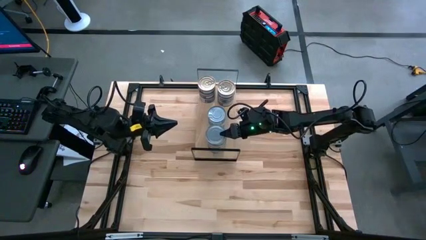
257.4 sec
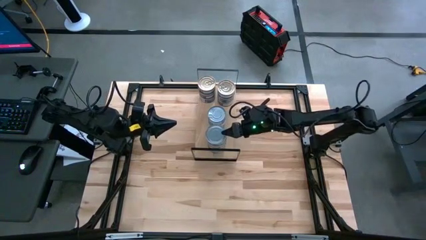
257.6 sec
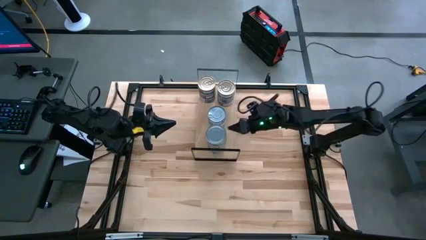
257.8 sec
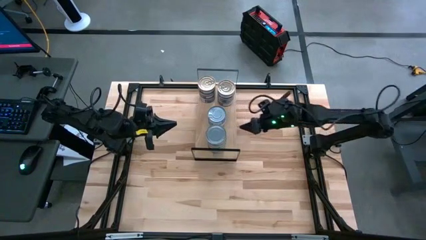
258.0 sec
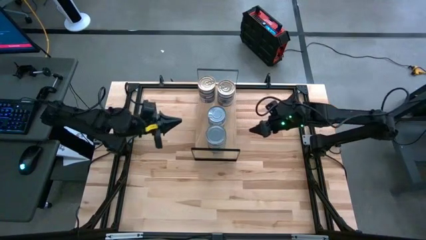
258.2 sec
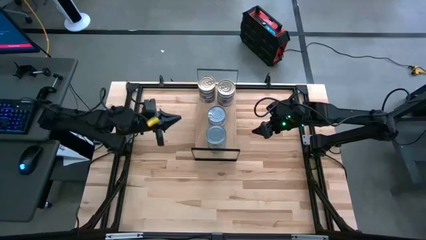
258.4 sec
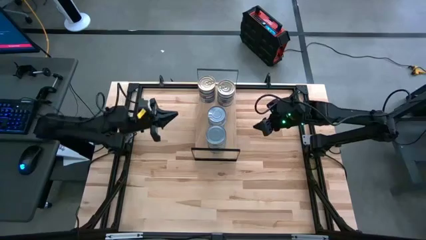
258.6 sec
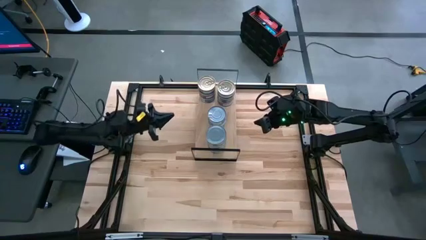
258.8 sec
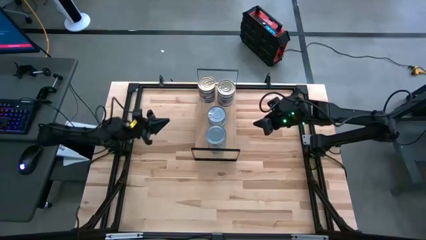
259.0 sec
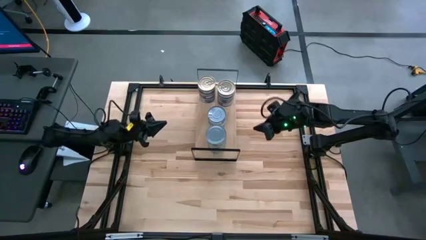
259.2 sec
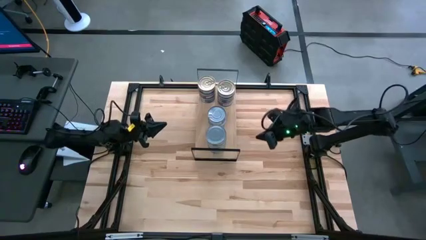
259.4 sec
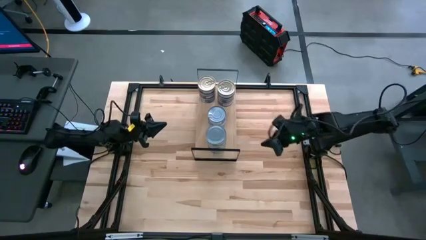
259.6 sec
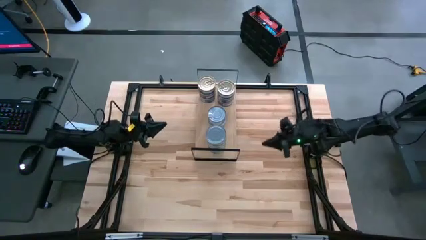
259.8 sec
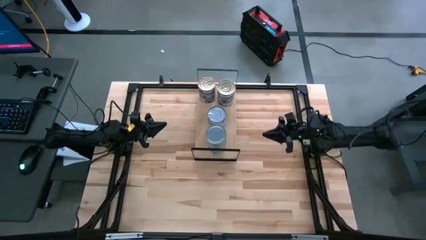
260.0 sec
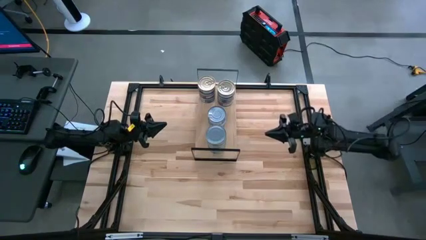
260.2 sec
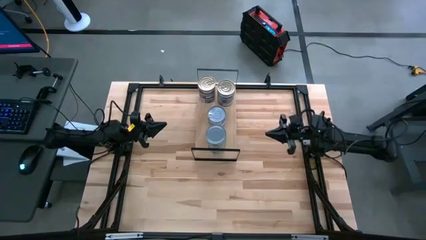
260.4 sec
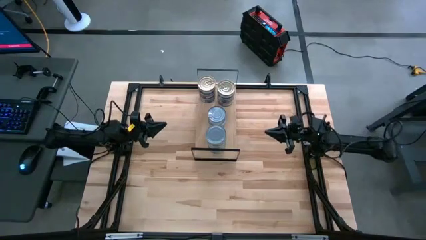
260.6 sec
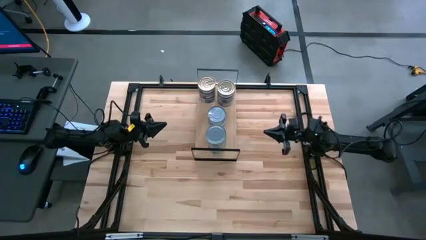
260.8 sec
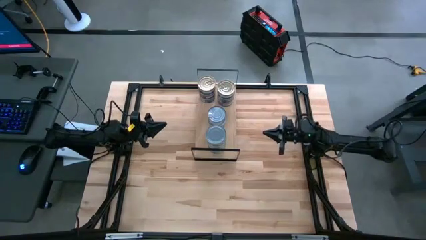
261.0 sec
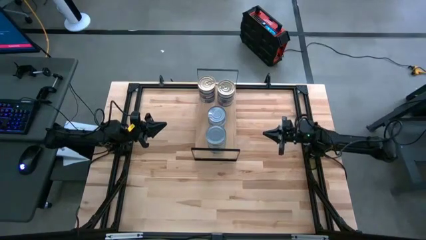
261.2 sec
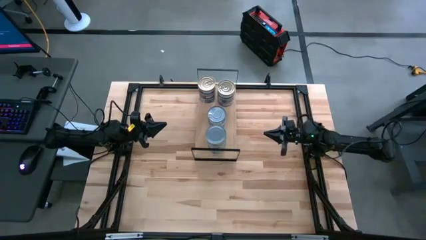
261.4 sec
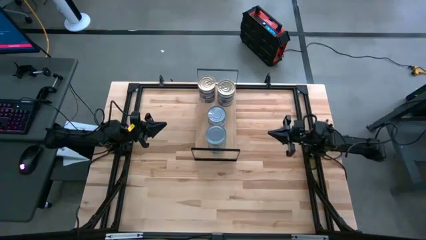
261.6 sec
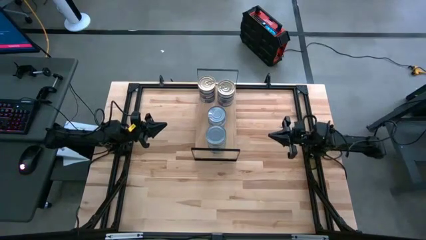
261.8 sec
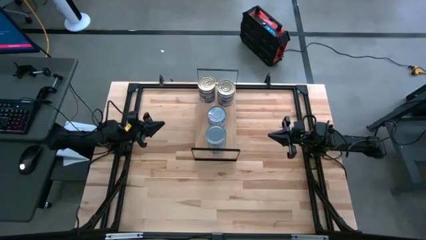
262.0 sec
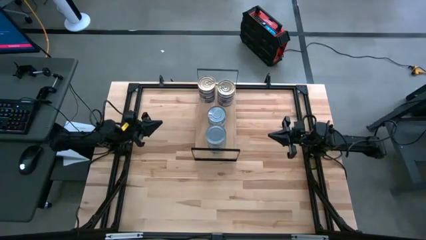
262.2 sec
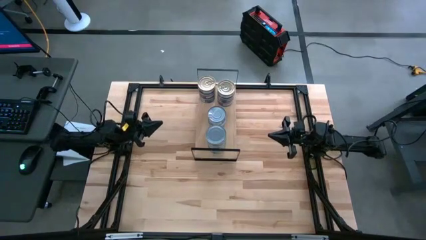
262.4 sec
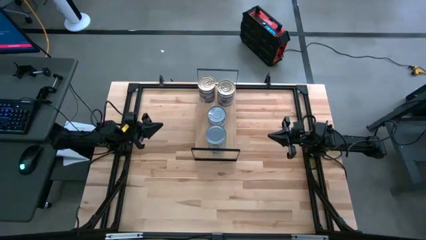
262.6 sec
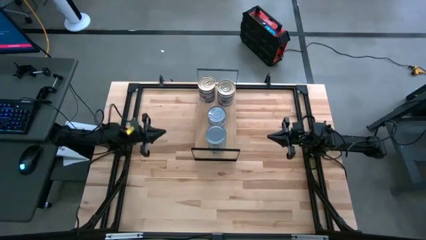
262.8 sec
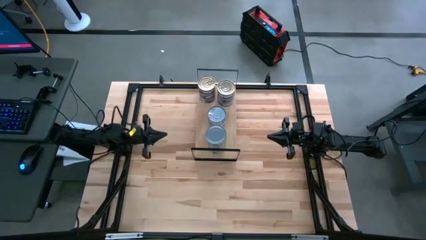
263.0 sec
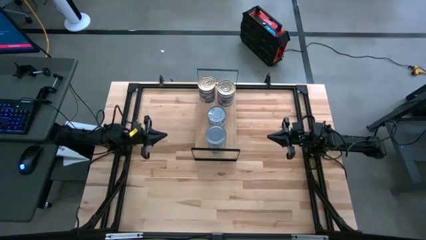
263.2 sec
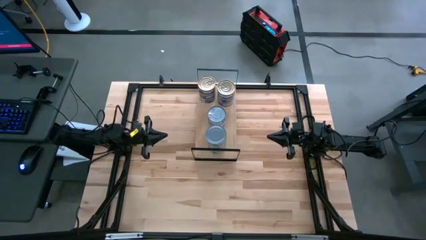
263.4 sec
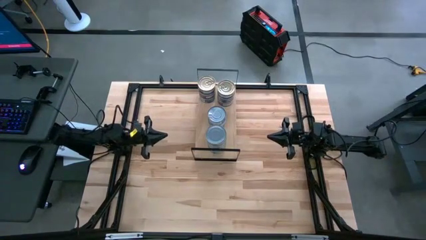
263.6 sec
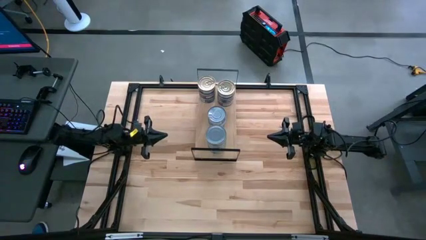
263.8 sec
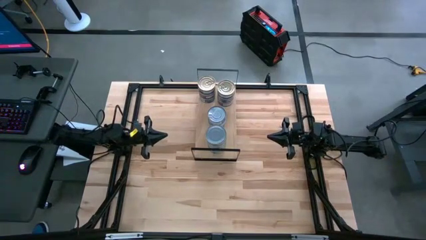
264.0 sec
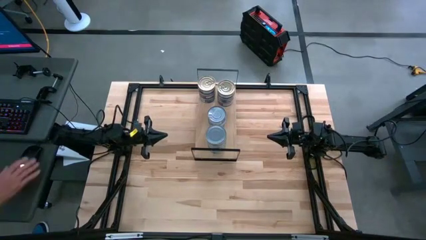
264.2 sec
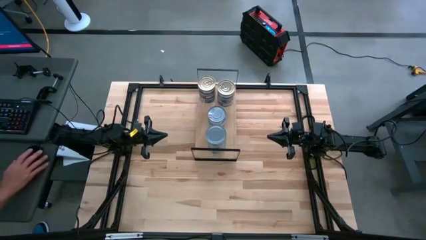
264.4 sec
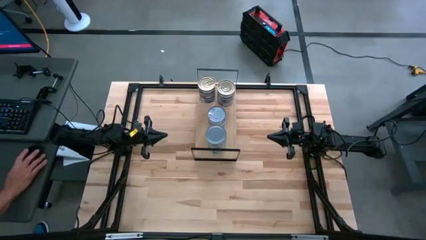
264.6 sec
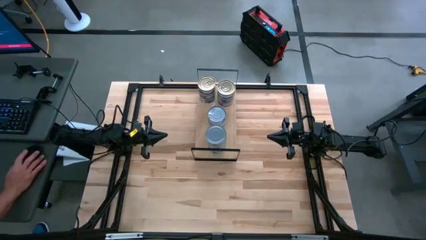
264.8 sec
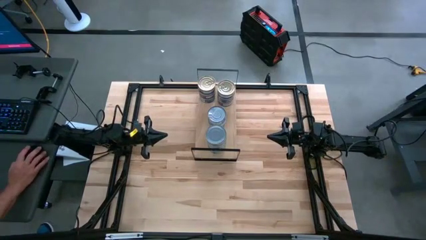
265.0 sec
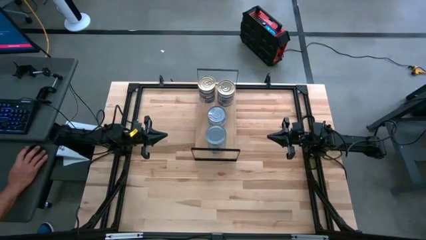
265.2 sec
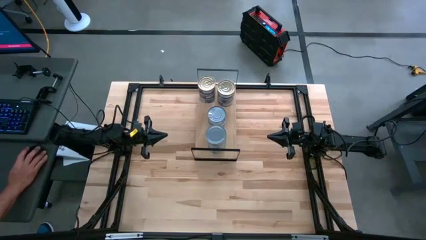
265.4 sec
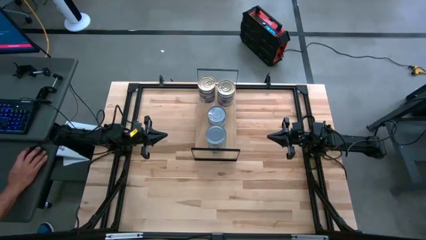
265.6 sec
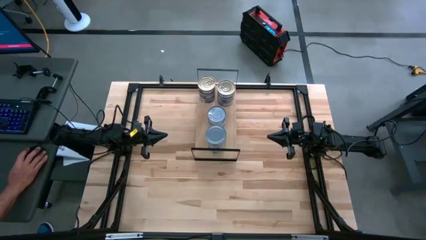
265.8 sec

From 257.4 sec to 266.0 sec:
Task: Stack canned seafood by type on shelf
Return to Home Position
